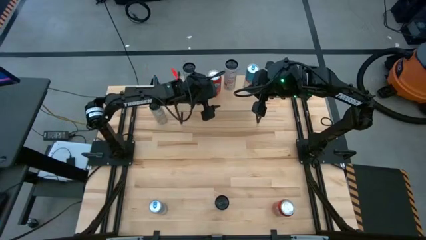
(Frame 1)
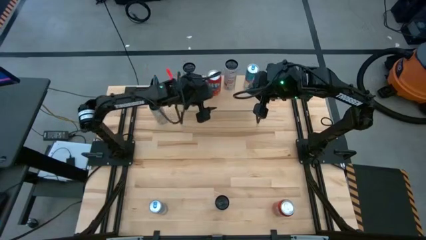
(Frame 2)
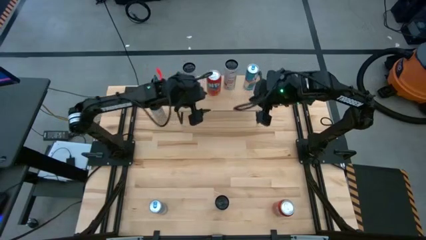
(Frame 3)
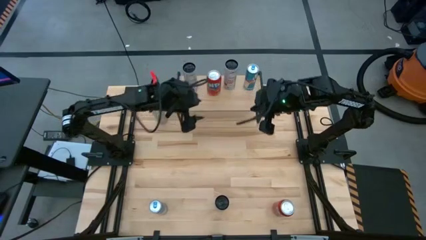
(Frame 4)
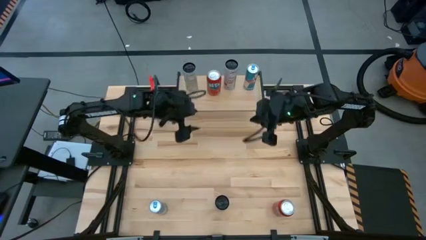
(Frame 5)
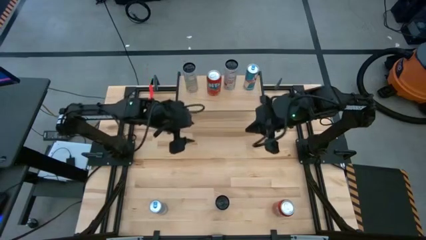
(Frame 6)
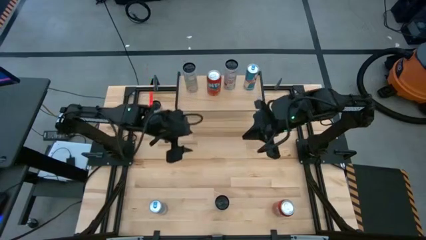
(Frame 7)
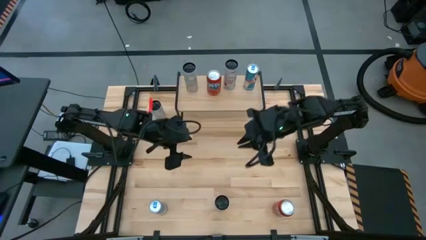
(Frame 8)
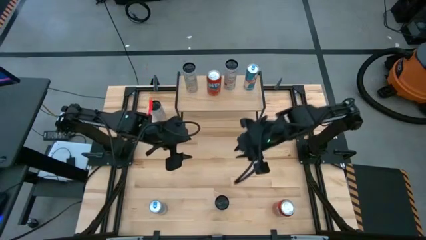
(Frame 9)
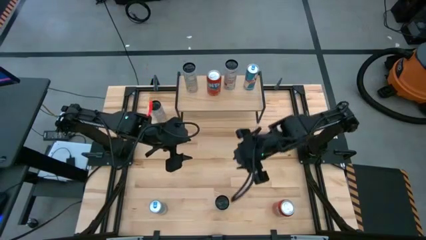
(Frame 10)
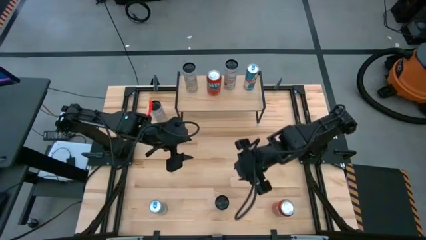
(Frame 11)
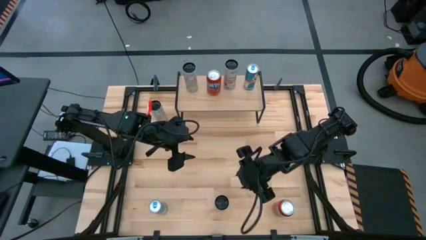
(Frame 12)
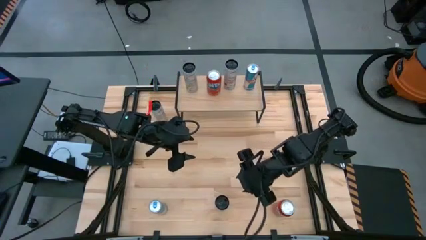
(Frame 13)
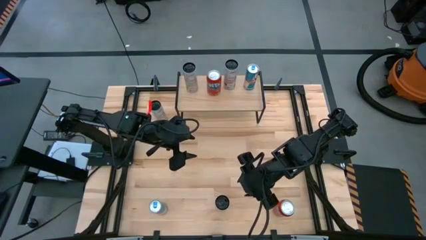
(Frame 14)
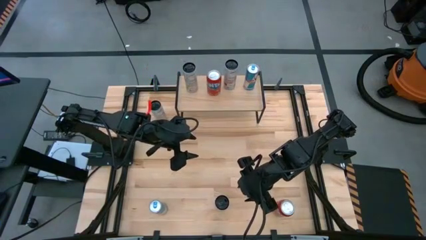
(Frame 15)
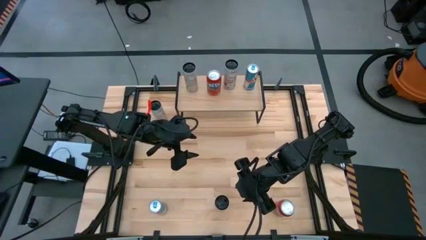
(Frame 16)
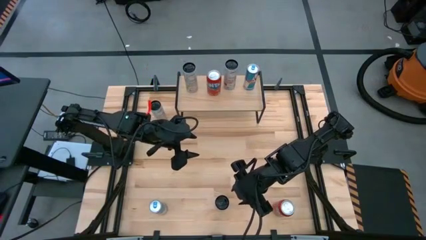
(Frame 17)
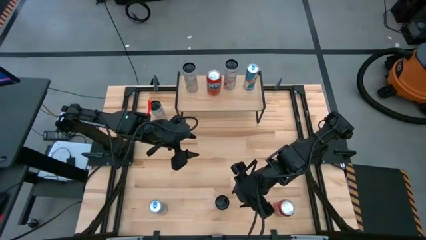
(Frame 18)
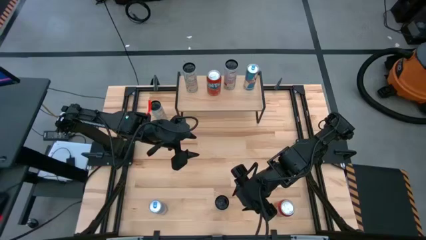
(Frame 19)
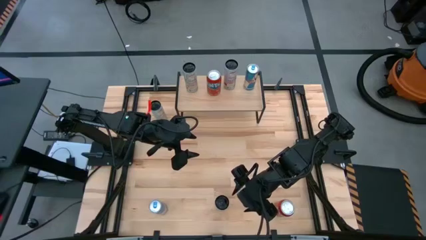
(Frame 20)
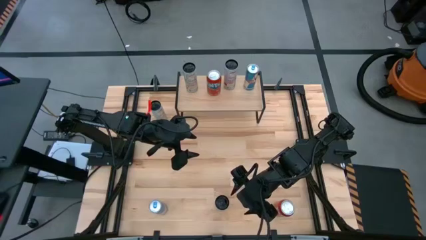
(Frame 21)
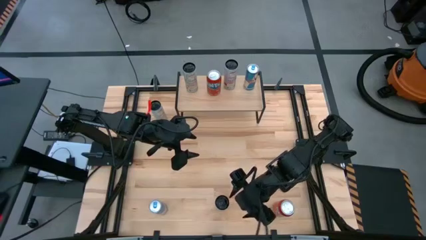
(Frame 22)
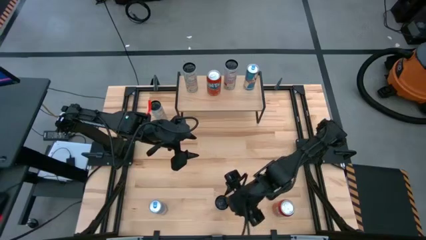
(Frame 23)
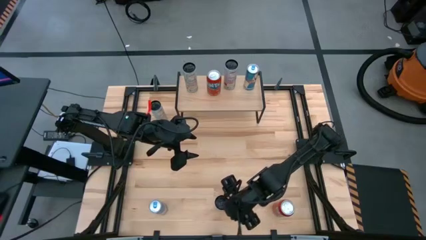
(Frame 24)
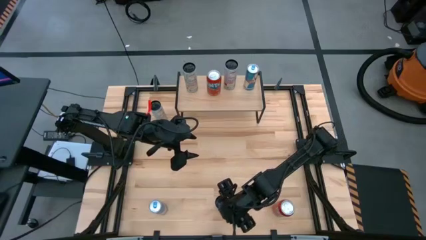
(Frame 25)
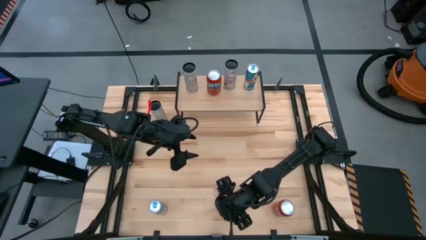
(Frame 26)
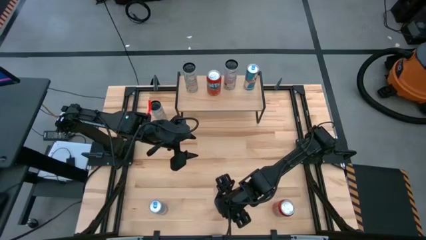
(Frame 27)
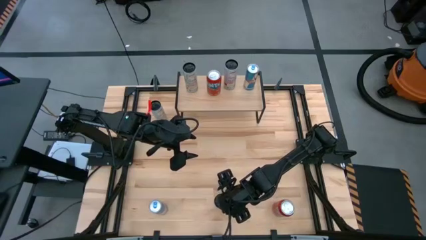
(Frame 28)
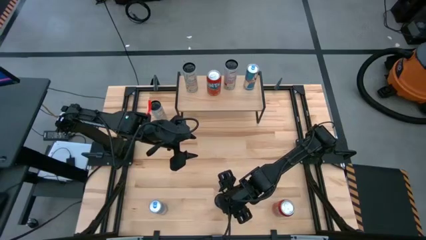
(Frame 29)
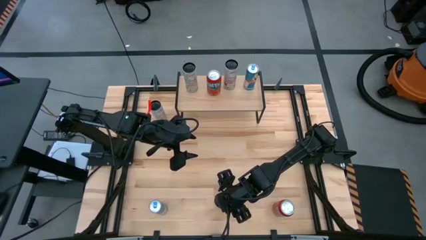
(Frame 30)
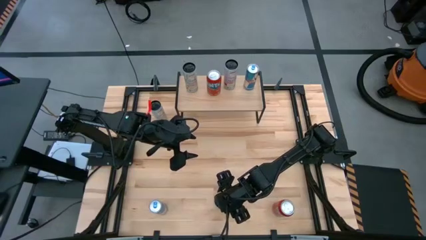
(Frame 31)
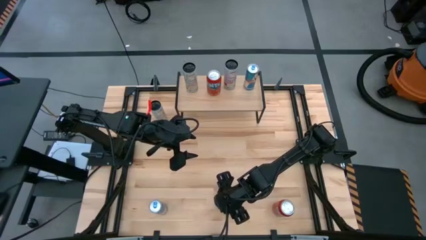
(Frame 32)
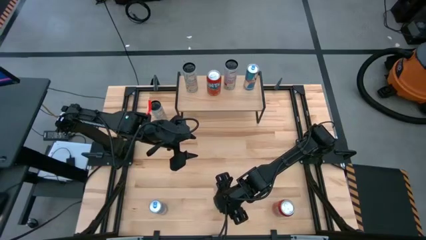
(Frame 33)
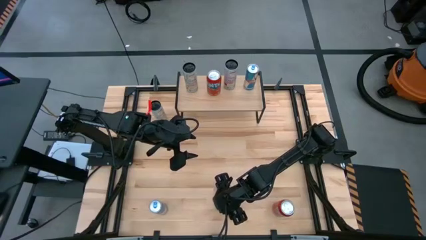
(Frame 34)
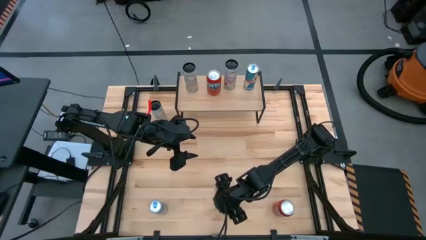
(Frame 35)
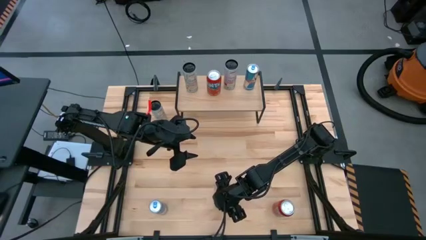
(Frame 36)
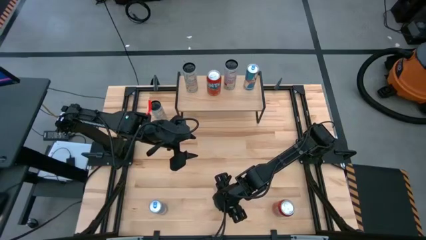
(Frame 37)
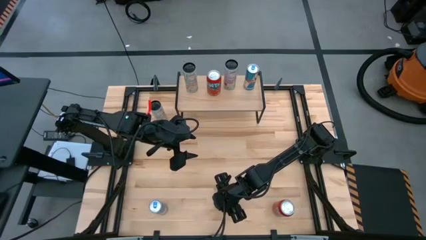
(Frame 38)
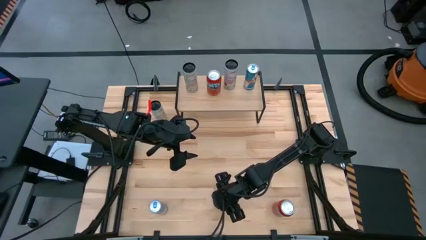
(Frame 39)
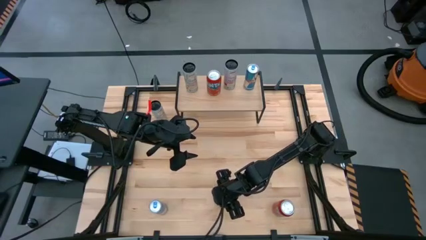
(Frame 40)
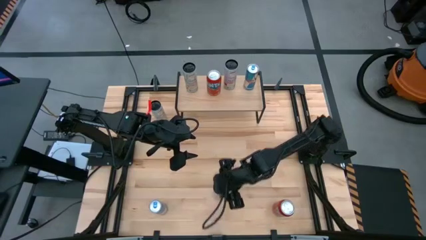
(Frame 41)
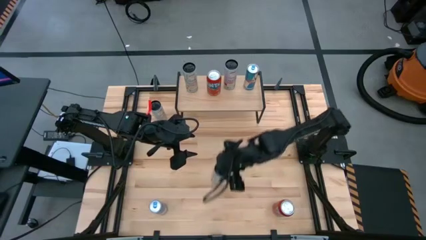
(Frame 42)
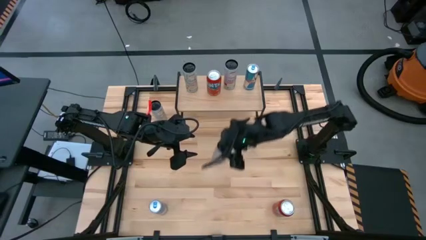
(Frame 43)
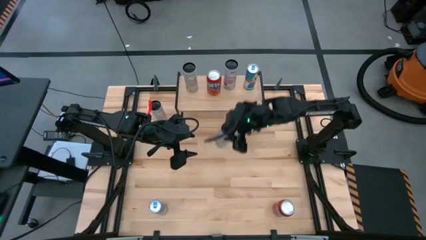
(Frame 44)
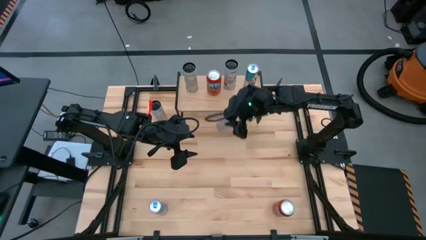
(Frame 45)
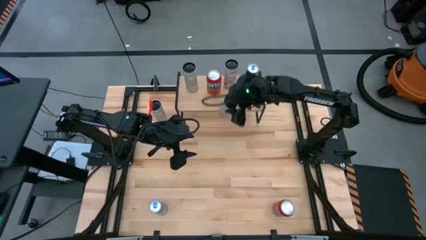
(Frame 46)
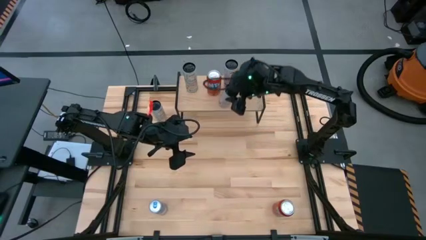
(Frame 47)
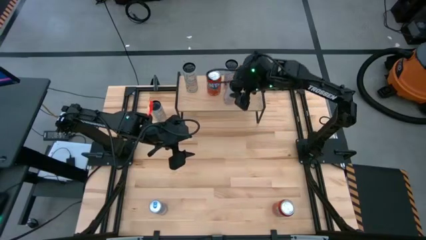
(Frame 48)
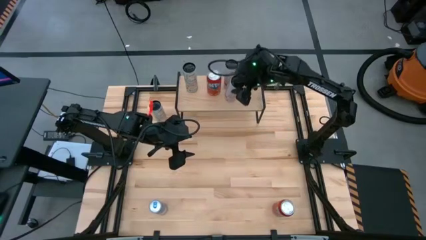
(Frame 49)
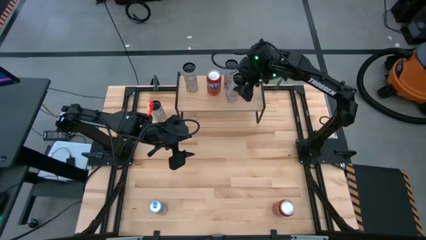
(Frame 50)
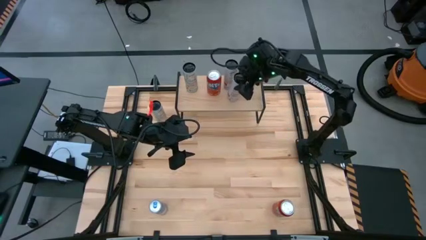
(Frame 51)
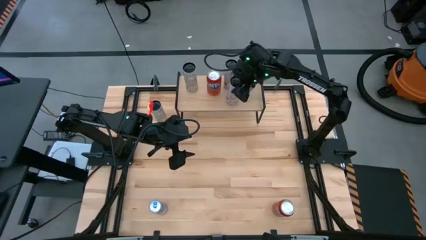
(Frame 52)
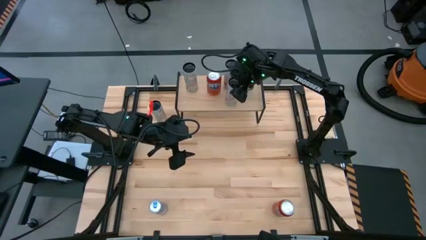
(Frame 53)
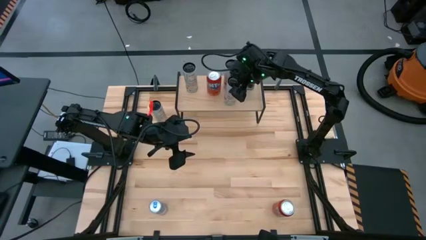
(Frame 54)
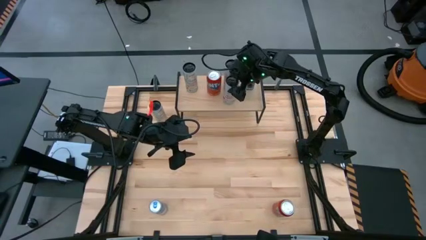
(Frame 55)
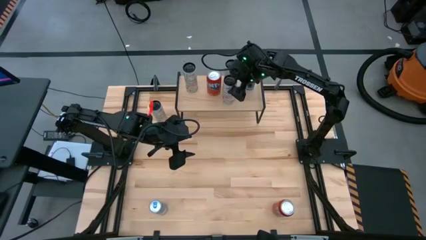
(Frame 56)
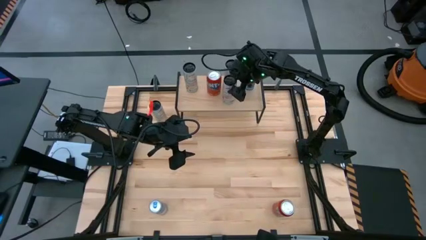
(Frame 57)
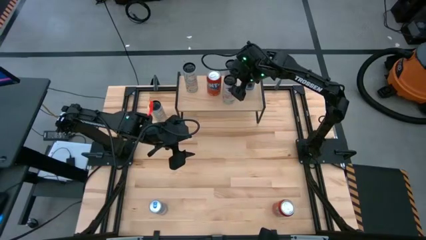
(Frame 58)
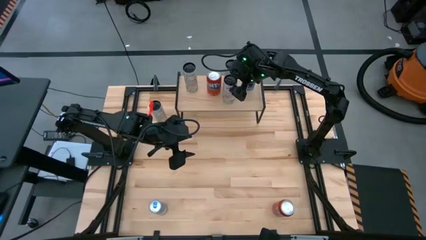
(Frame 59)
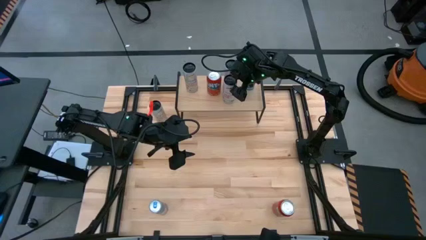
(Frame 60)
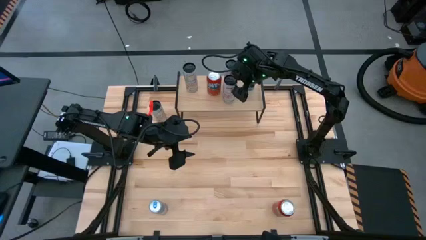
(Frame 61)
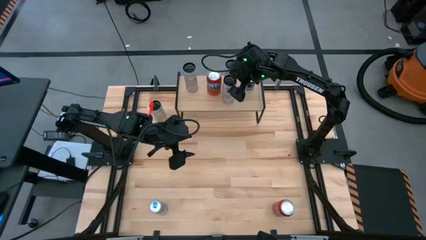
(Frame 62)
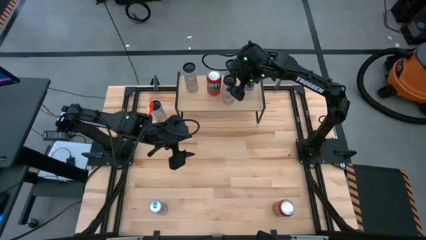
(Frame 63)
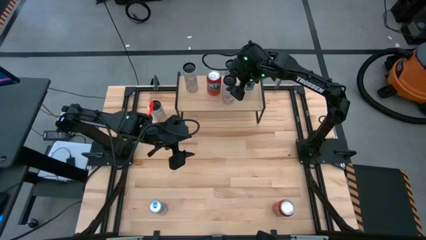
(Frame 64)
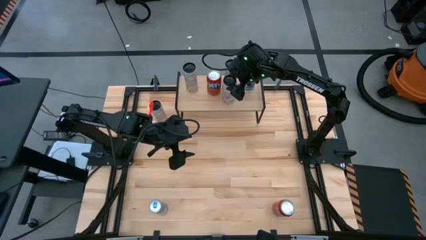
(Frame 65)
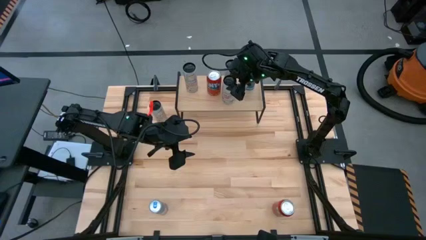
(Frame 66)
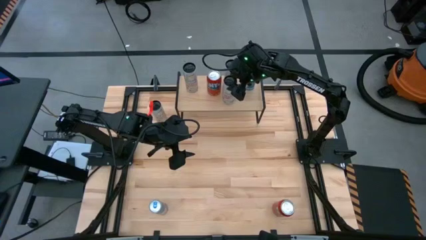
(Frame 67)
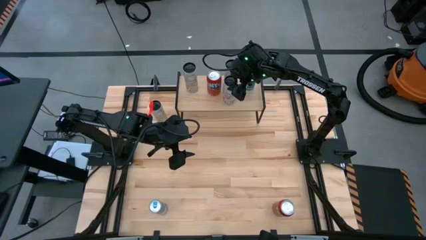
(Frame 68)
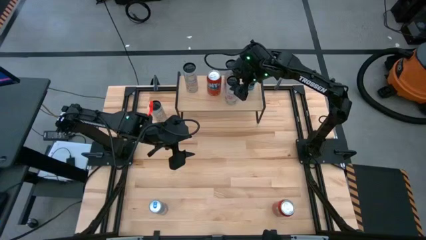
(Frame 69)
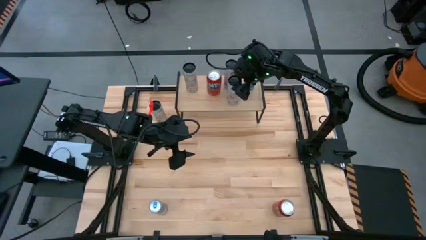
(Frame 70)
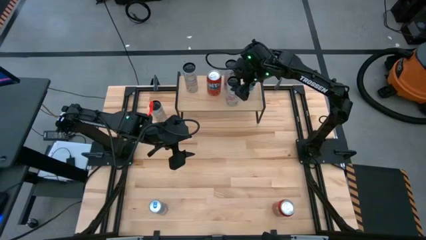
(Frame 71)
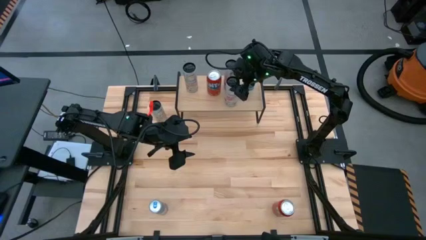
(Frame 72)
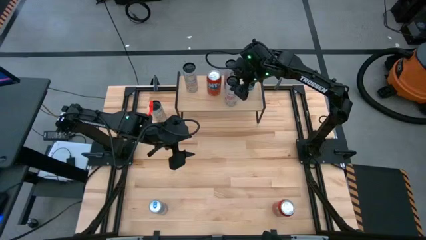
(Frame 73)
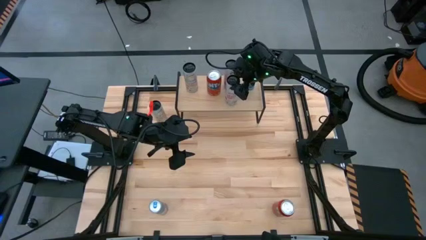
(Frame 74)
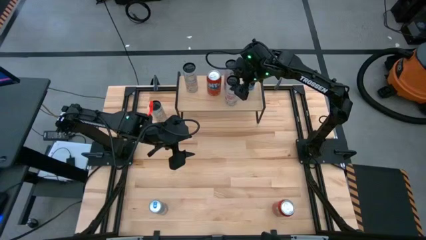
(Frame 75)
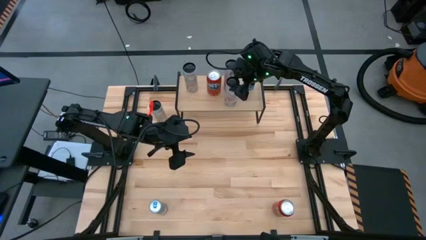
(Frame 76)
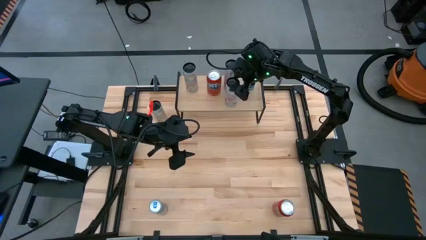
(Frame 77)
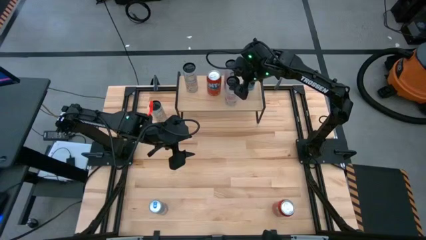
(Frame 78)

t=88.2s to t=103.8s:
Task: Place canned beverage on shelf
Put the white pink soda can on the shelf aligned with the other white pink soda can

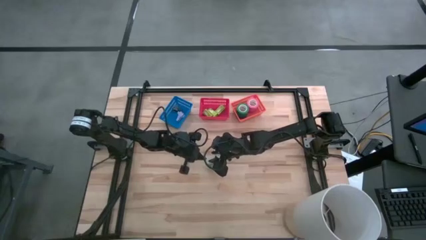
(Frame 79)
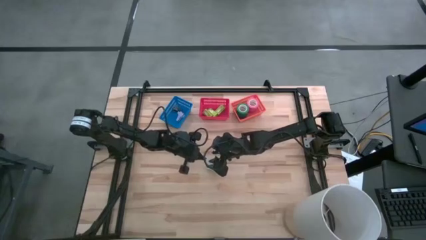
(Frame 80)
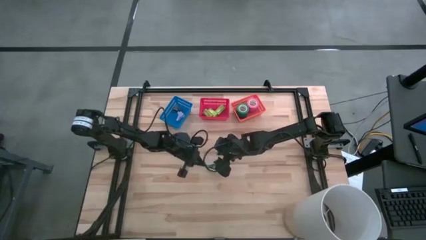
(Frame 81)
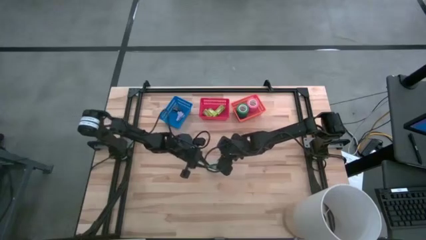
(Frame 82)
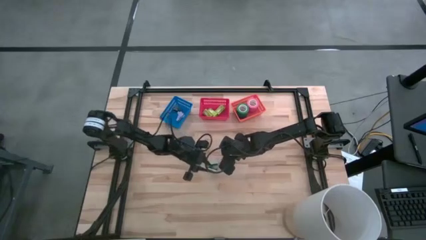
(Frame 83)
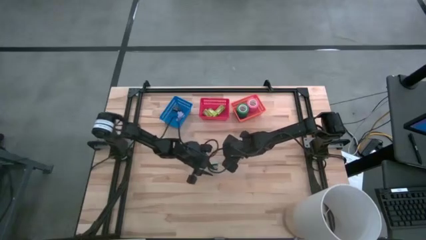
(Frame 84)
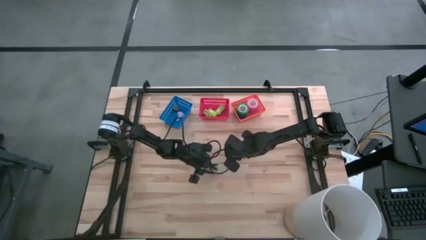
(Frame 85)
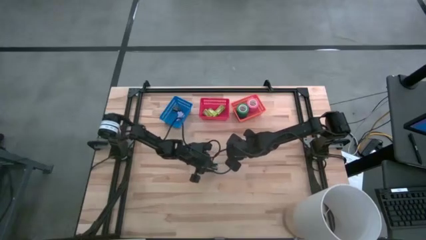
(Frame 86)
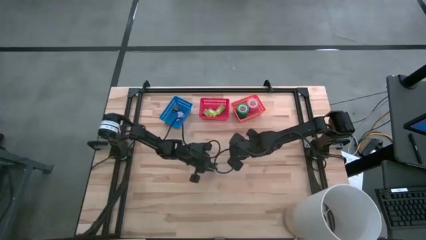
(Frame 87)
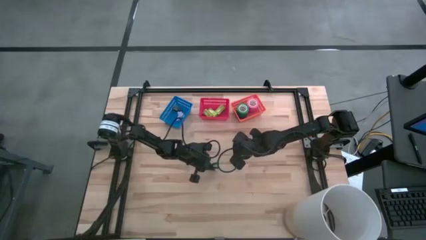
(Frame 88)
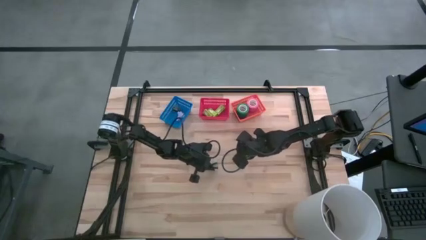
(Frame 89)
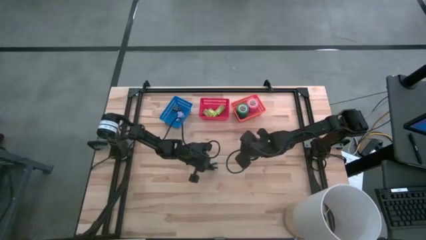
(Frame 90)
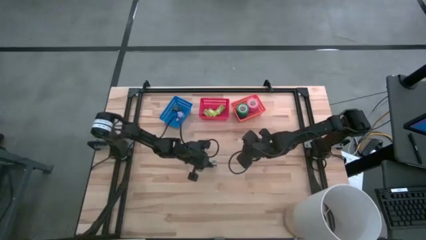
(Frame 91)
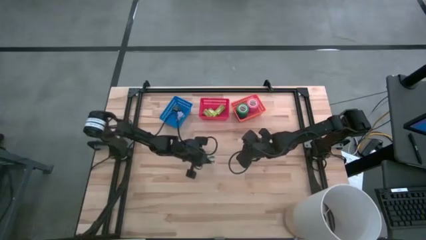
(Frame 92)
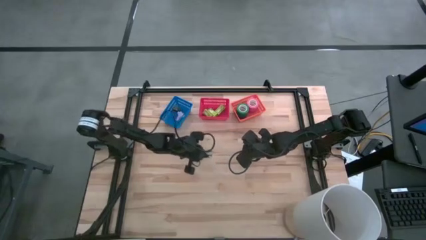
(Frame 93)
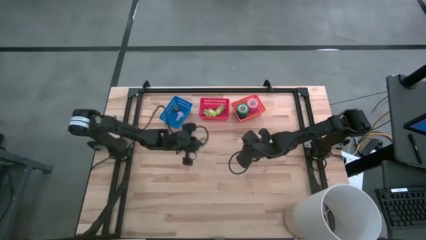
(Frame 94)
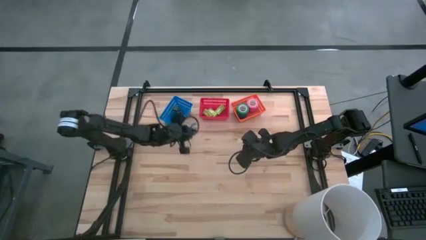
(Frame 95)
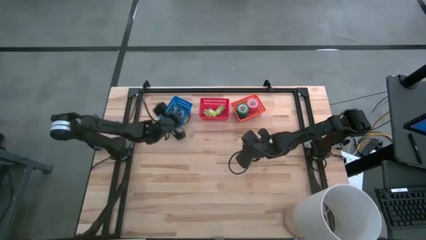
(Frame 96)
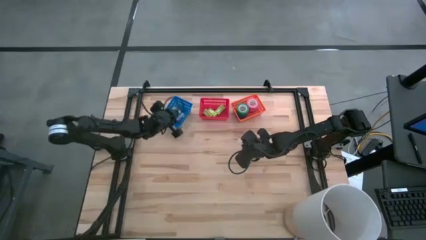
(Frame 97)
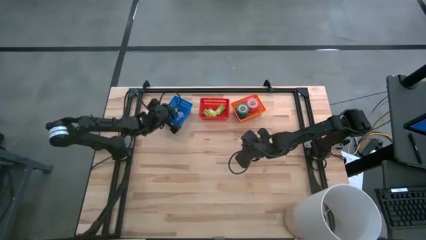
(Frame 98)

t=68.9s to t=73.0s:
Task: Pick and place Stapler, Stapler remover, tape
Put the purple staple remover into the blue bin
